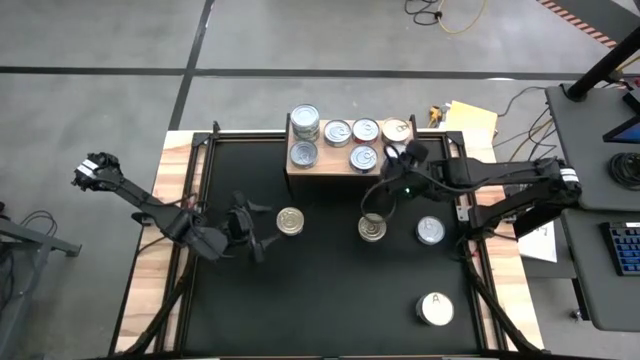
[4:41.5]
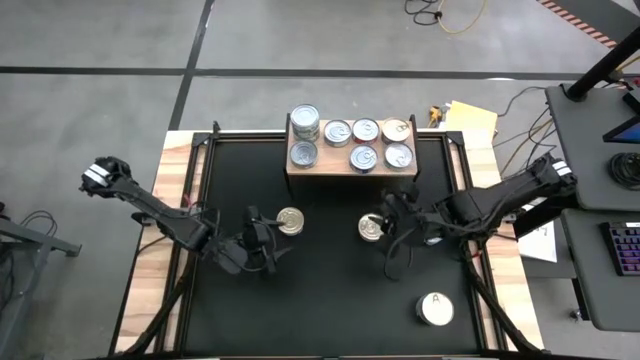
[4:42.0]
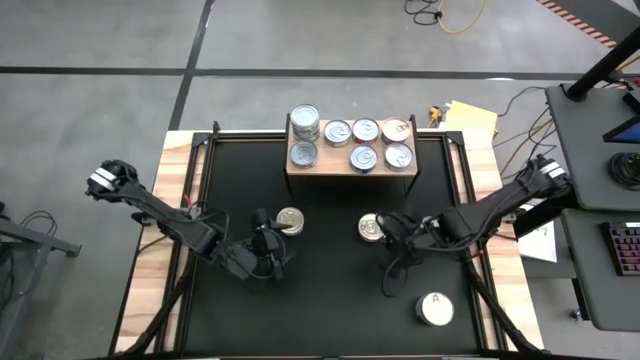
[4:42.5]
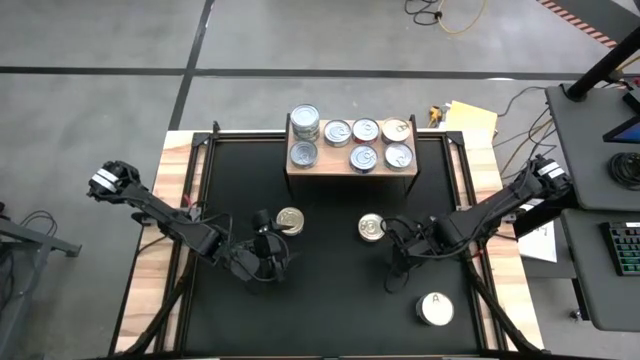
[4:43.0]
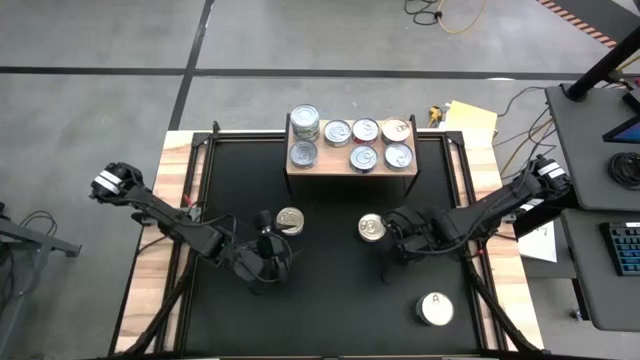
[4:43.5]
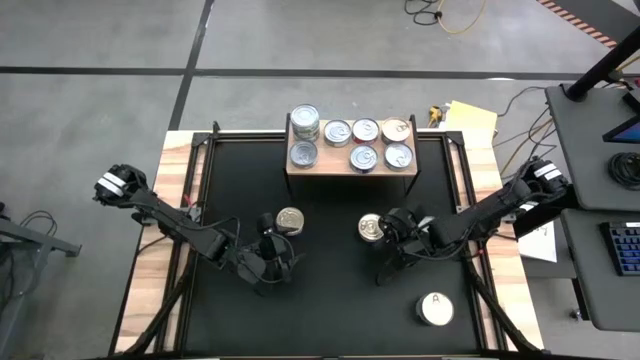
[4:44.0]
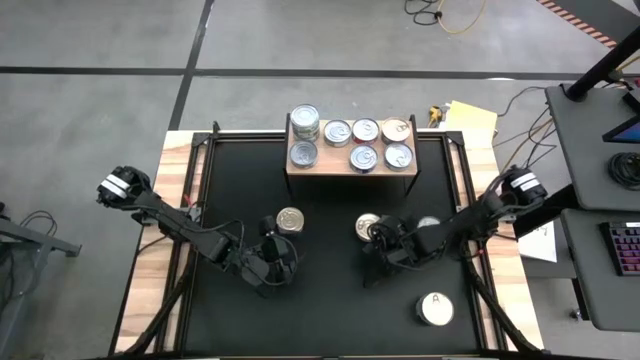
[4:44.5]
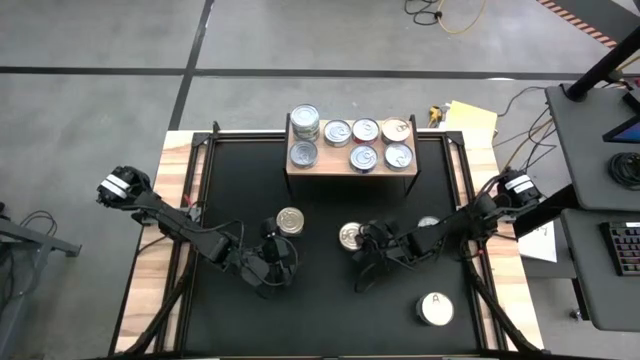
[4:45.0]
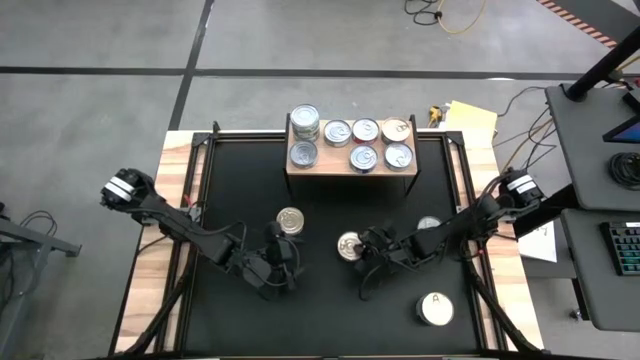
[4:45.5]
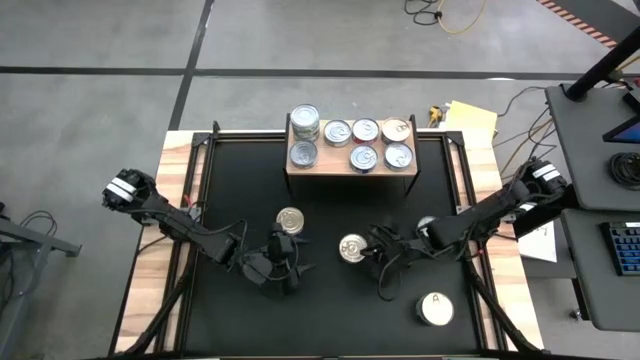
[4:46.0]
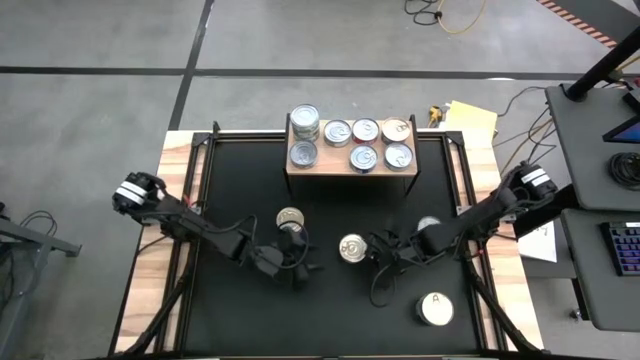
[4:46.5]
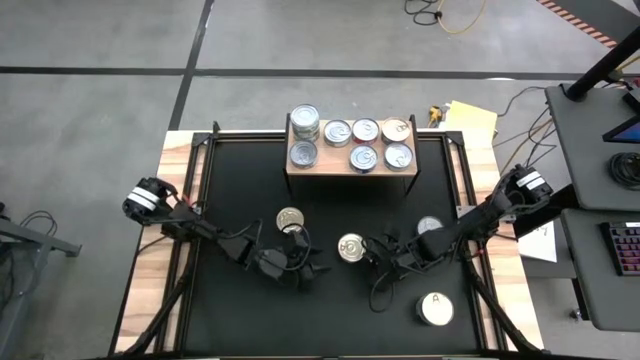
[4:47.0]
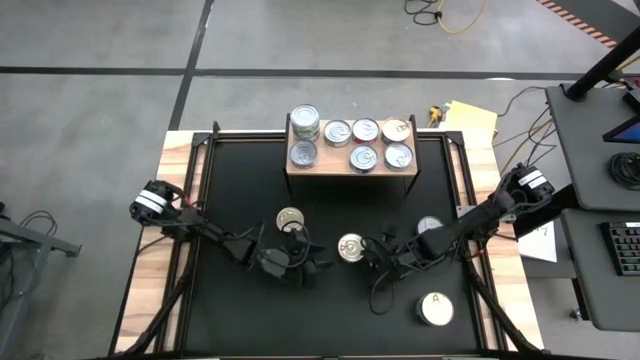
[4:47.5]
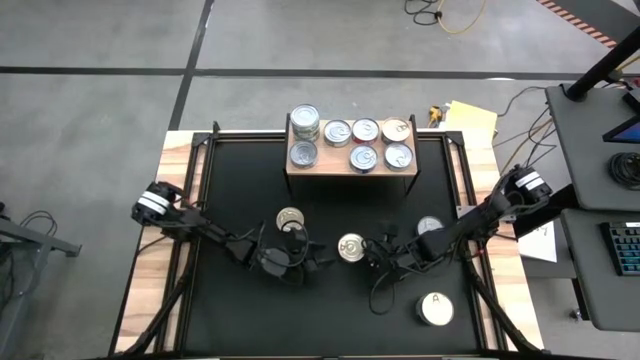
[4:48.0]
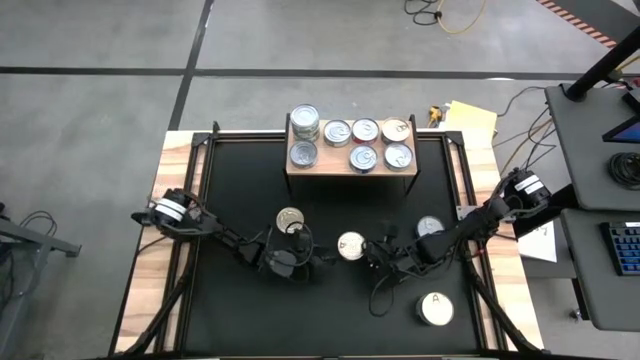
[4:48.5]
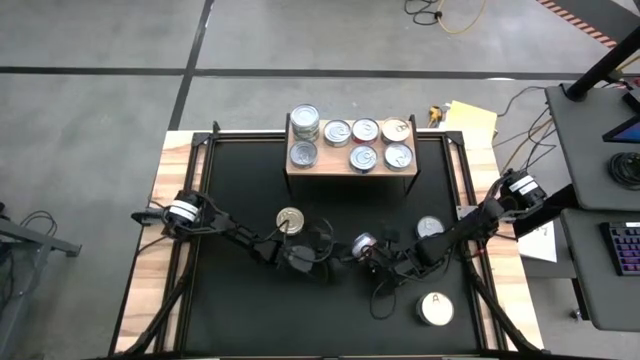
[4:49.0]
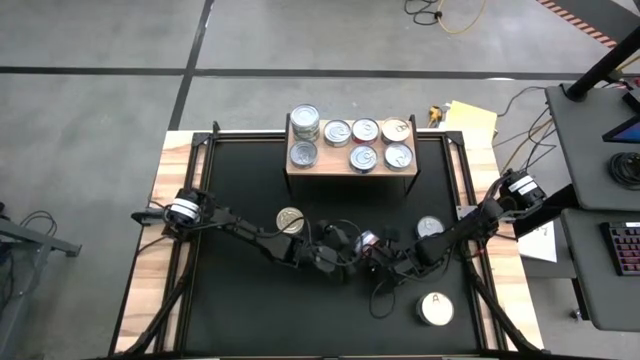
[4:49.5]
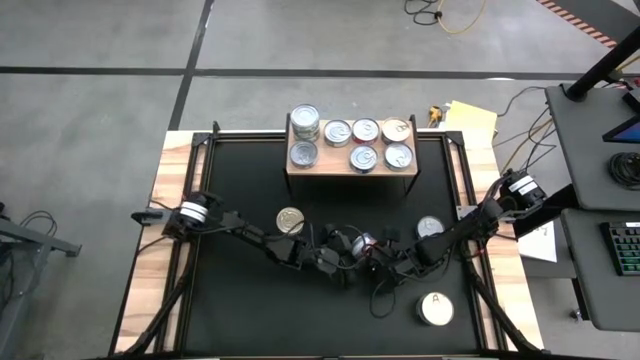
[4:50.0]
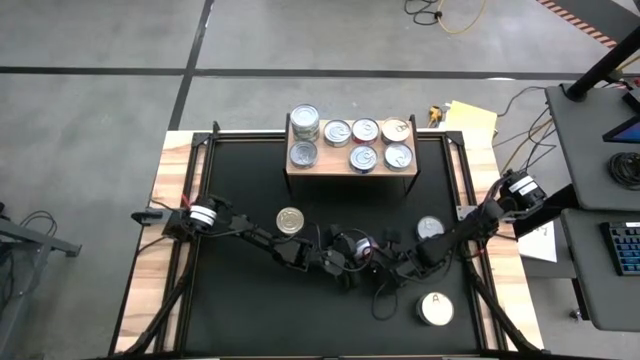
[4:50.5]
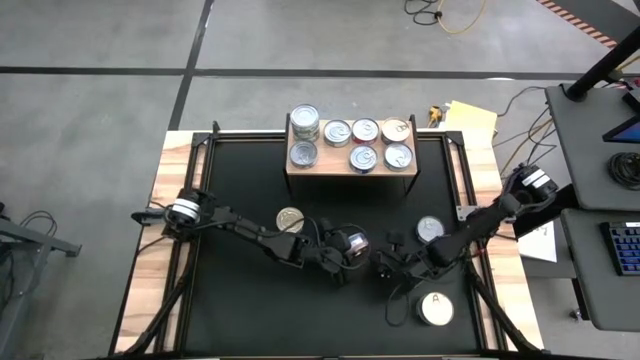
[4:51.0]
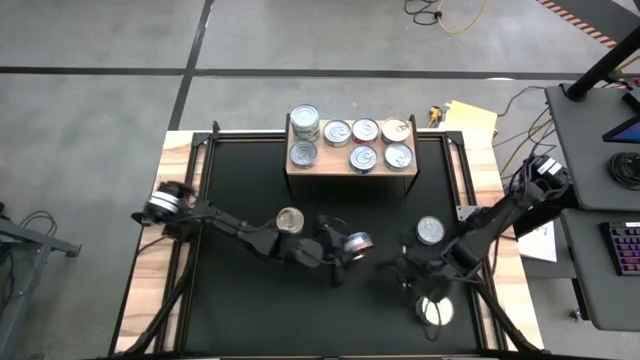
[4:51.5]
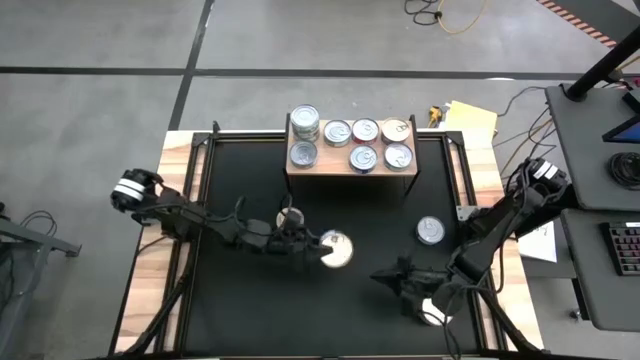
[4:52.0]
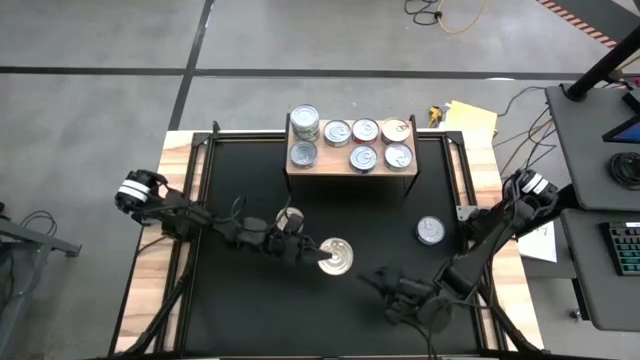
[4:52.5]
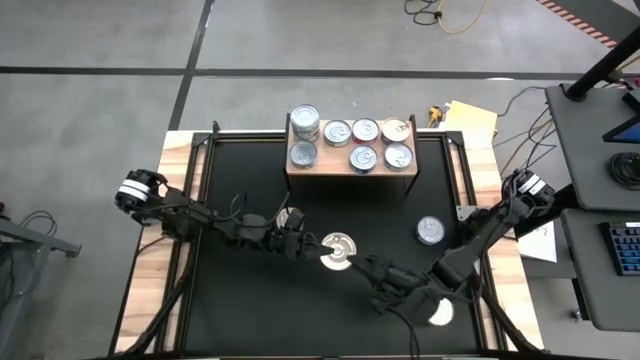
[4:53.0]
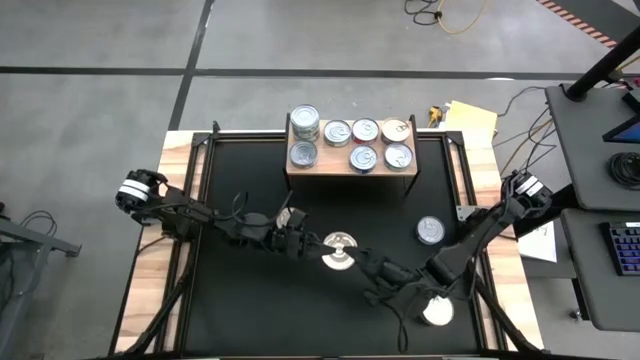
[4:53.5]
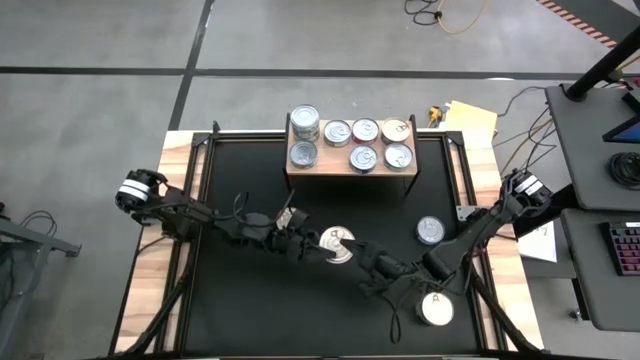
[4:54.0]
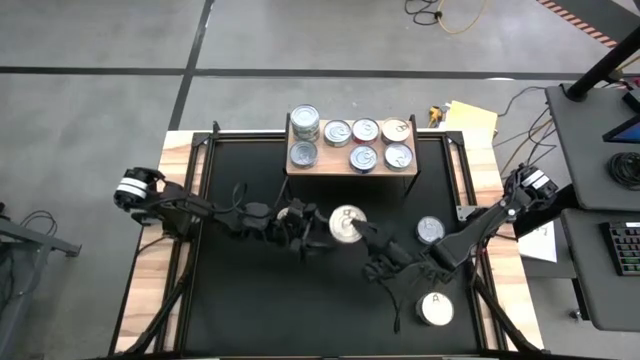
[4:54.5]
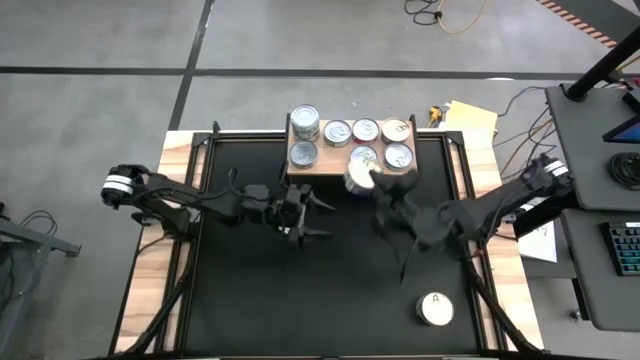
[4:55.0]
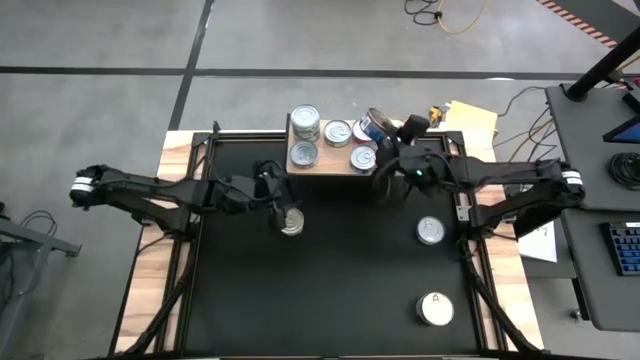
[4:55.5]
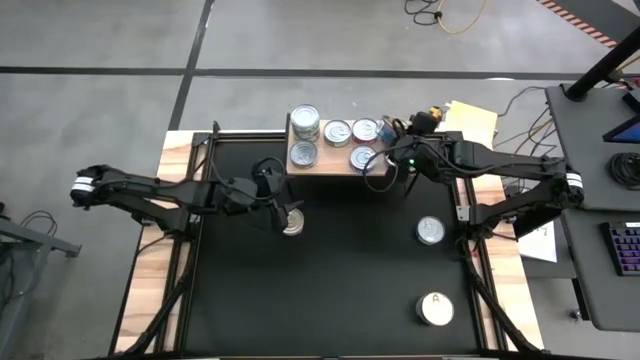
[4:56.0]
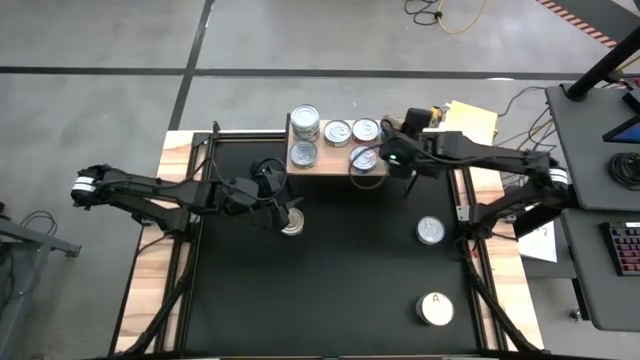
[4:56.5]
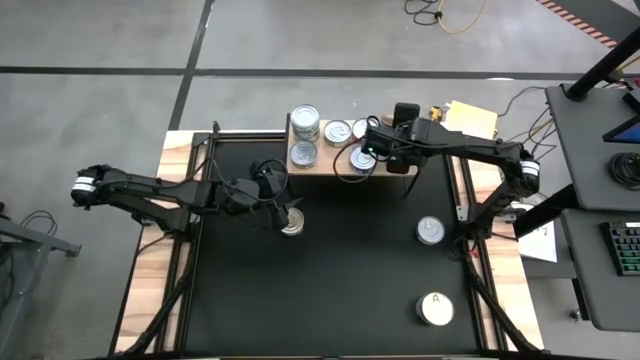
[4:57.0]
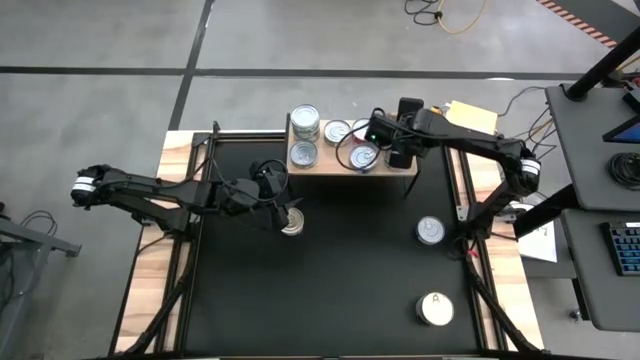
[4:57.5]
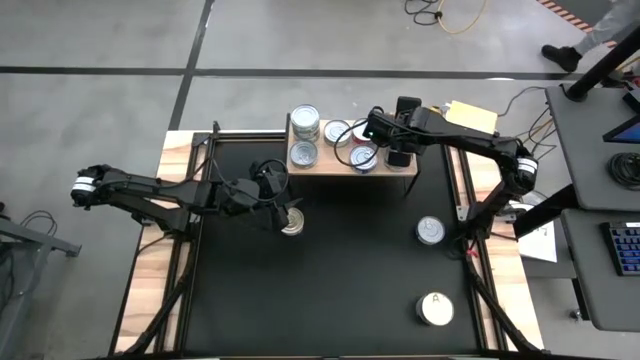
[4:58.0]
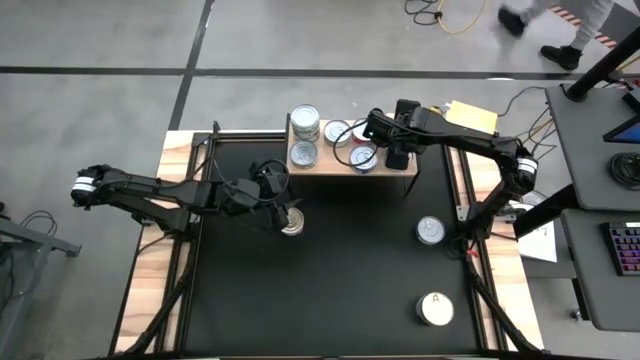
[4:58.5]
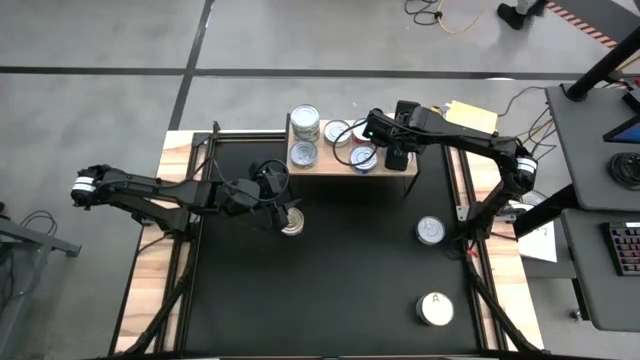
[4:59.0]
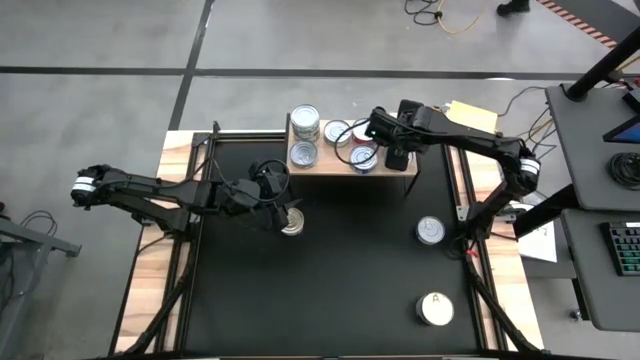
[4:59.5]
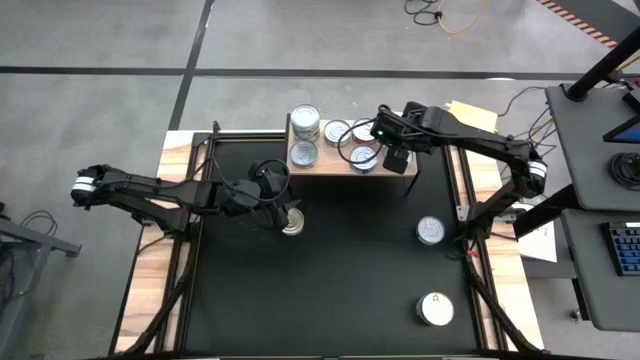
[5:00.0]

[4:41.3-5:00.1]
Task: Stack canned seafood by type on shelf
Stack the blue pink tuna can on top of the blue pink tuna can on the shelf

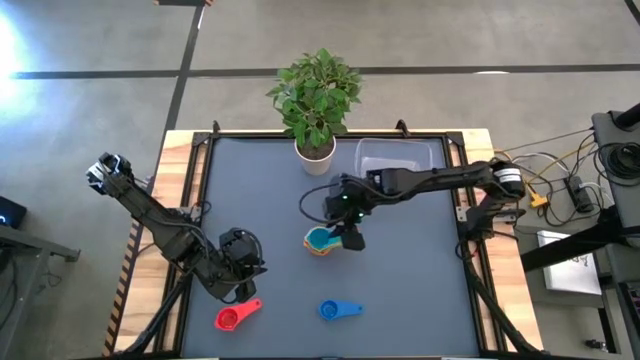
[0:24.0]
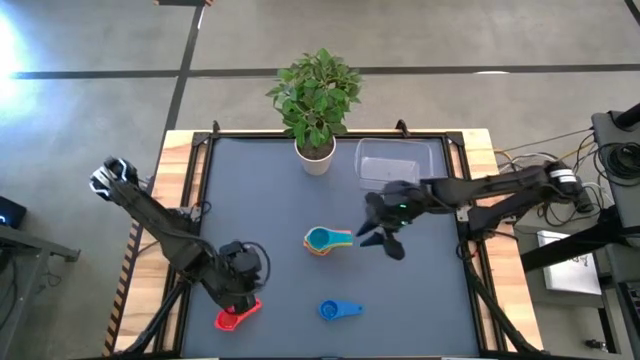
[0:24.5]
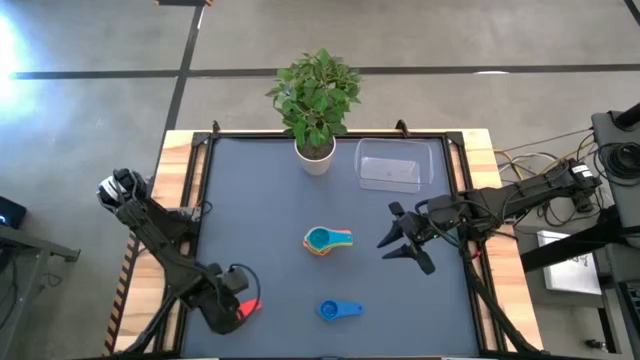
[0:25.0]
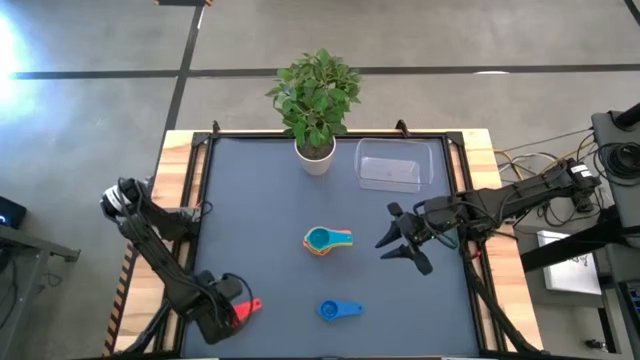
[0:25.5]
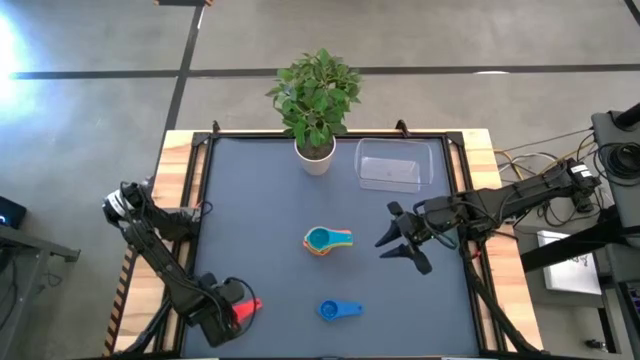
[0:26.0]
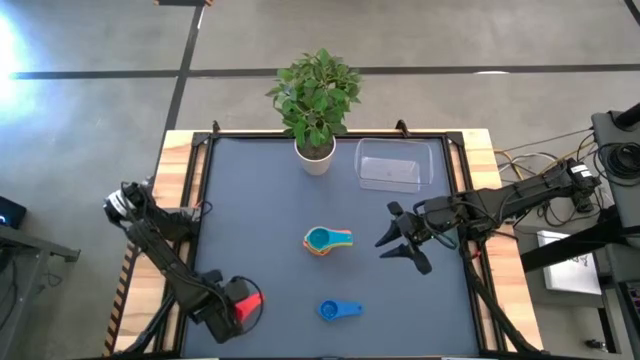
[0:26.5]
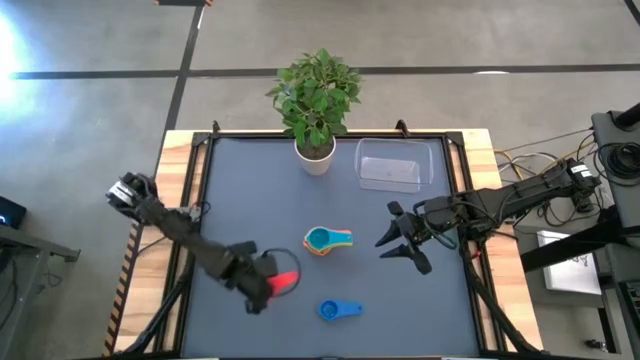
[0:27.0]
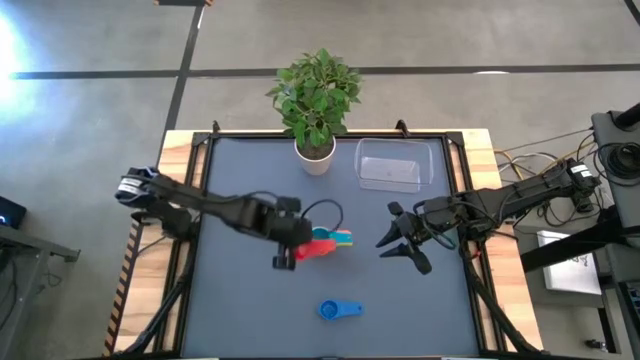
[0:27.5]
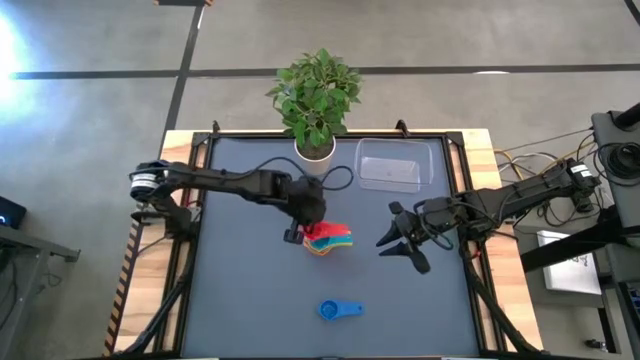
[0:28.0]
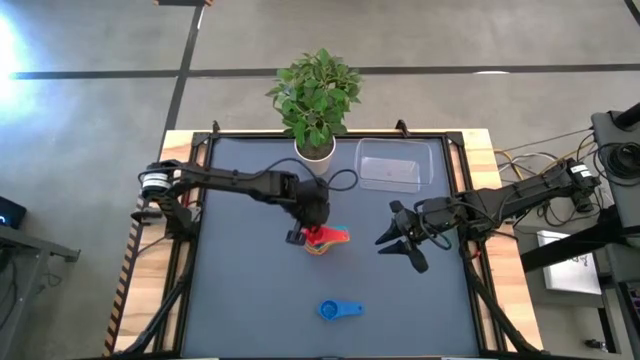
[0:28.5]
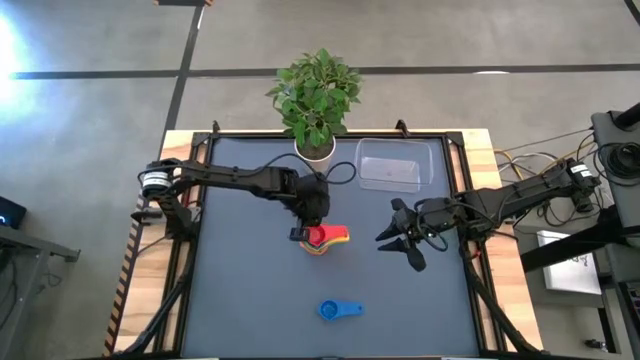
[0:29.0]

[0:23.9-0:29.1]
Task: Nest measuring cups in basket
Stack the red measuring cup on top of the light blue measuring cup
